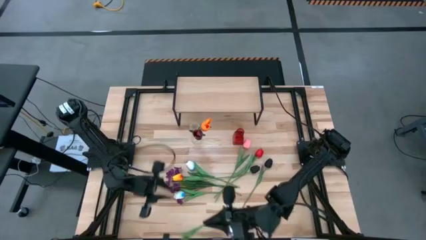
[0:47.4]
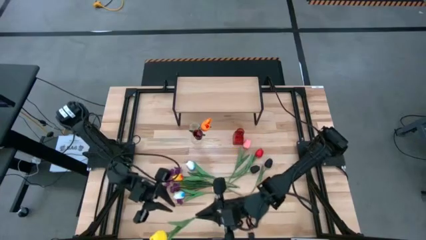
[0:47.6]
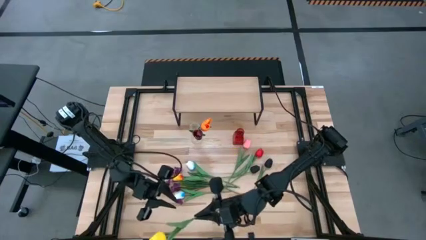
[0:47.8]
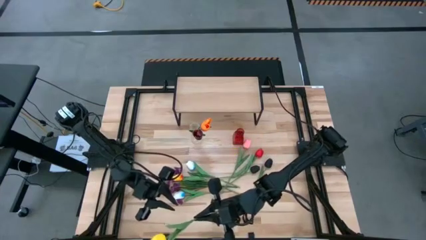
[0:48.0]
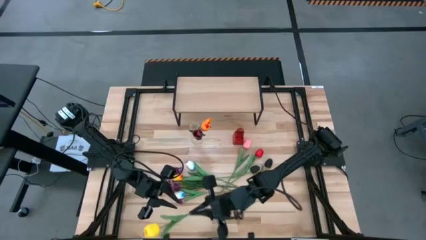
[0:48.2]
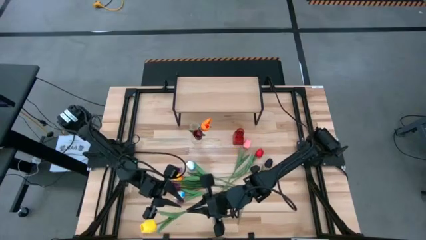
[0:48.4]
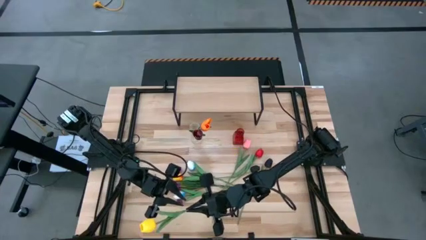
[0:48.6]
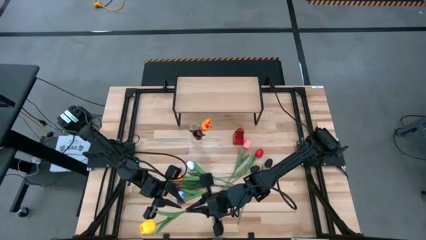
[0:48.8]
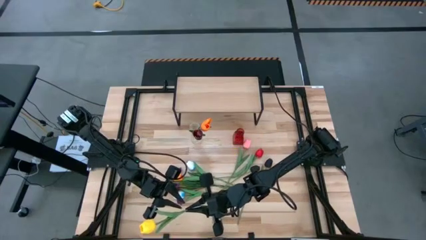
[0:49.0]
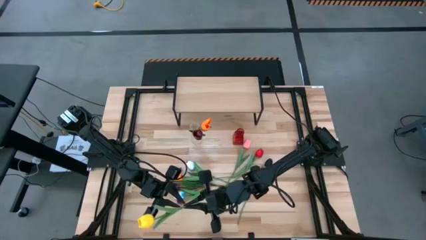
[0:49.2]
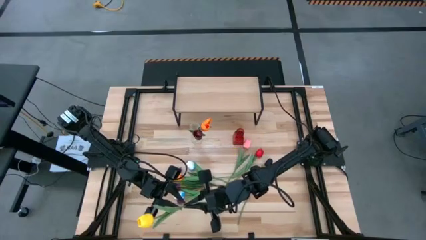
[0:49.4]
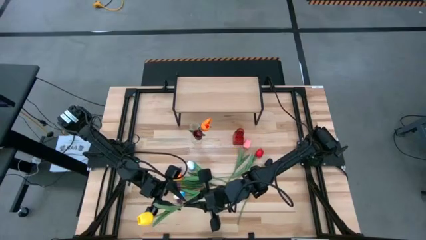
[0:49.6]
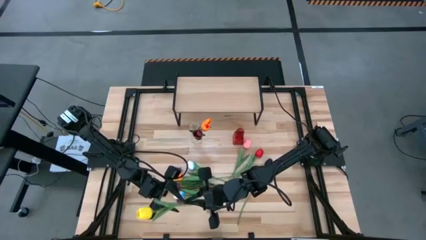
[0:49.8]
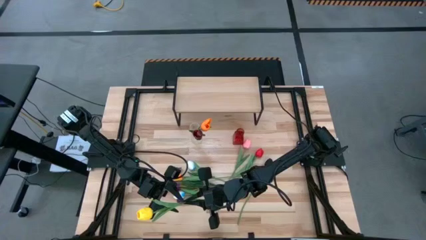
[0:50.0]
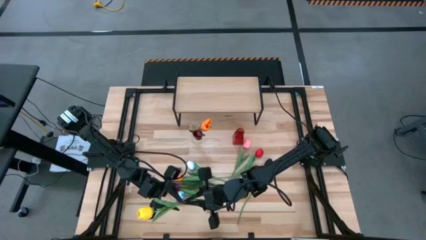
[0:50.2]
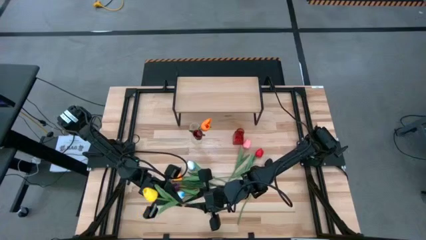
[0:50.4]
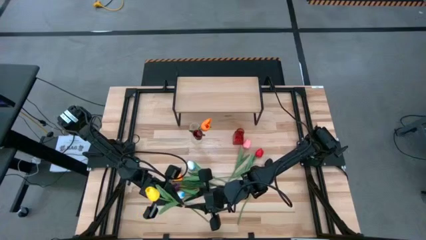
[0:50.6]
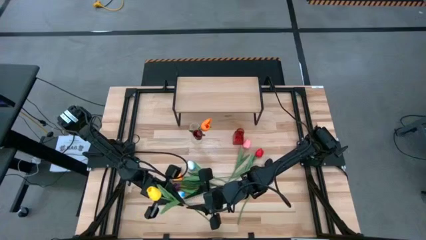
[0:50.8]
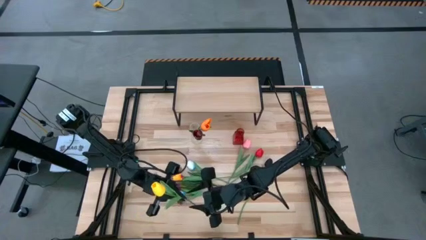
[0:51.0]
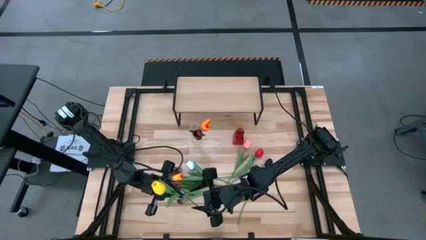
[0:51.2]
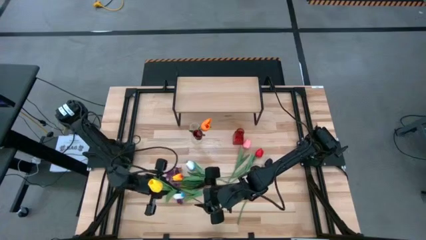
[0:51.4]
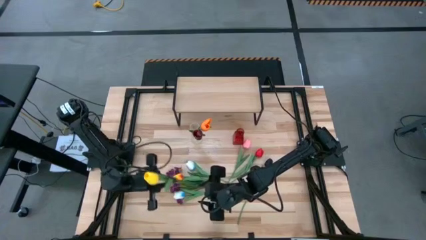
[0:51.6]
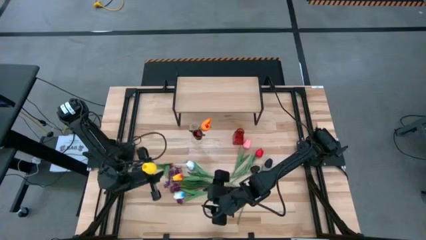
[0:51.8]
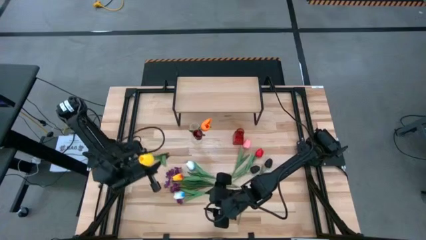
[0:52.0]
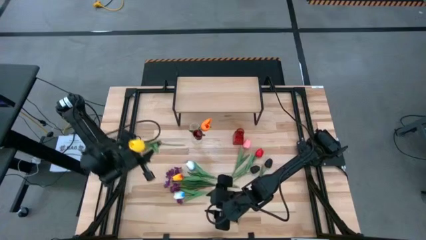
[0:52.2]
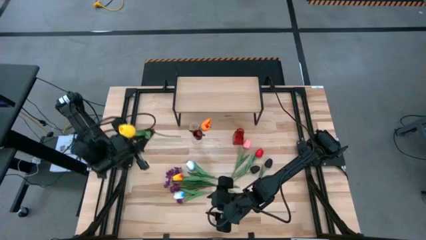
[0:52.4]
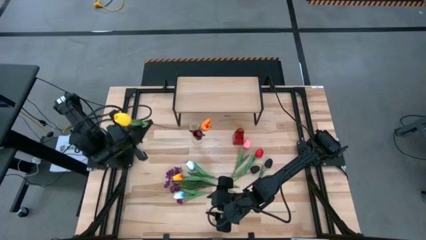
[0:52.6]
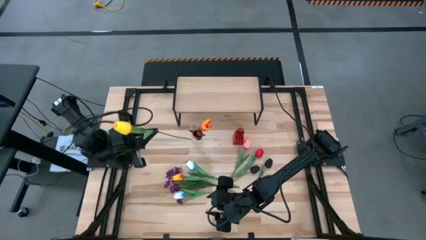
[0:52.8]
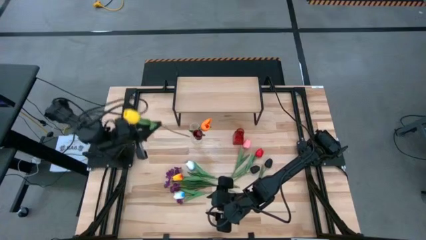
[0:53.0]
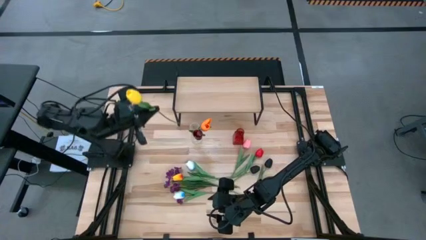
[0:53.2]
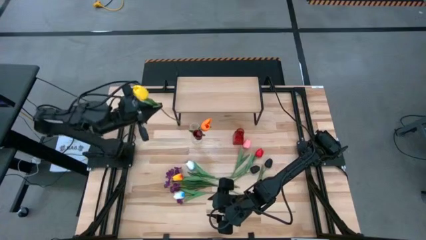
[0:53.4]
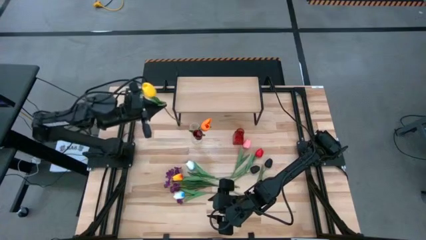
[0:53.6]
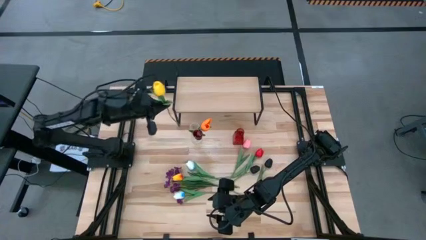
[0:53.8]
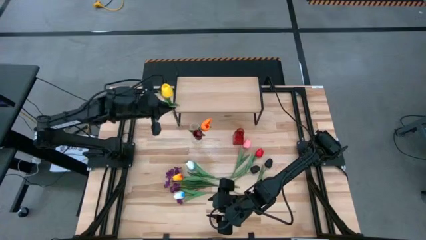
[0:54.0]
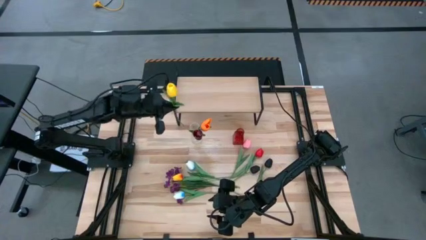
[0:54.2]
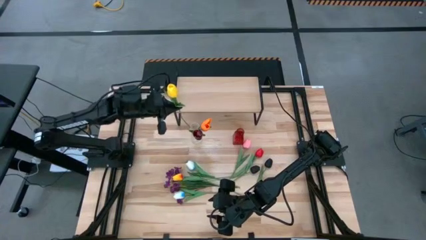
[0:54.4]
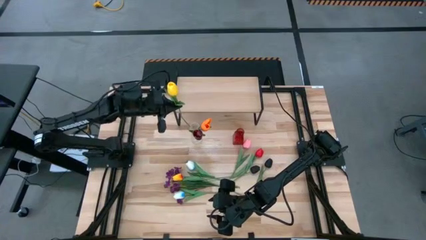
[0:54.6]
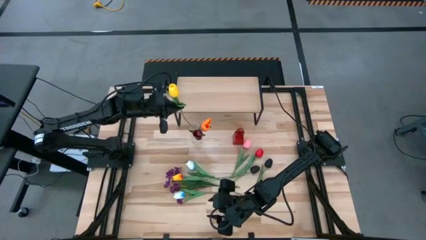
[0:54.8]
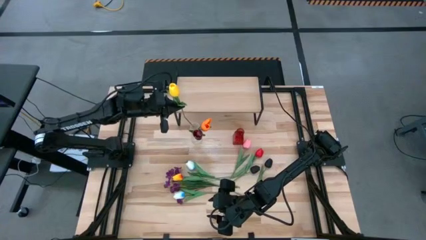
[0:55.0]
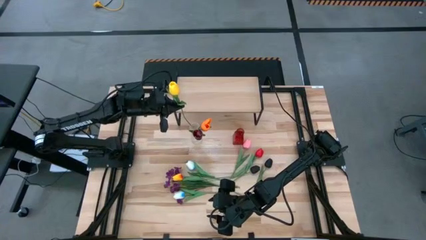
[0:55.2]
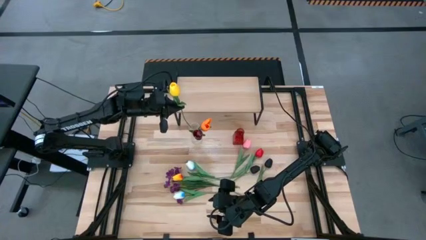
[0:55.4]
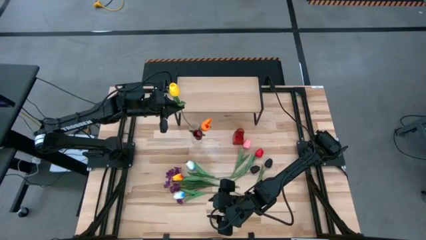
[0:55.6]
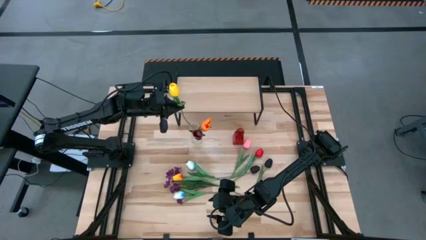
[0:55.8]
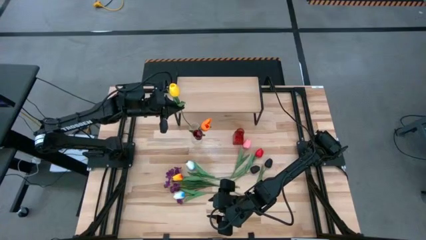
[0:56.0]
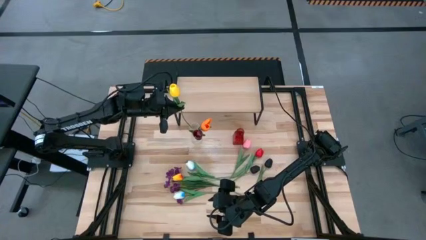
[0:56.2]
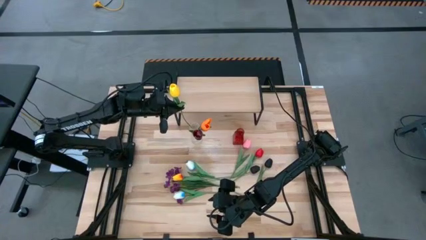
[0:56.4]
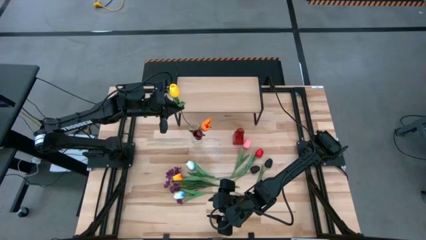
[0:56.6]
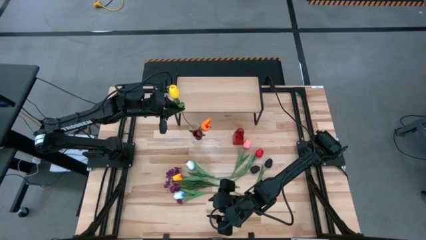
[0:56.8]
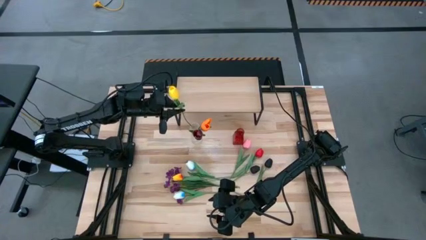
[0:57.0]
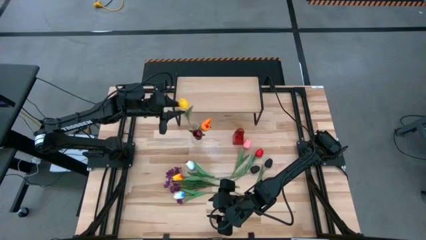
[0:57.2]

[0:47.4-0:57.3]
Task: Pick and place flowers into a vace then onto a shelf
Put the top yellow tulip into the transparent vase

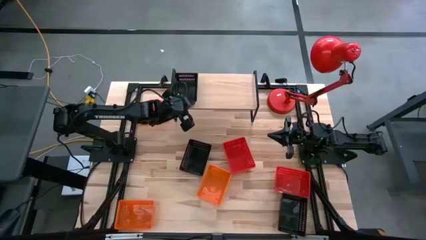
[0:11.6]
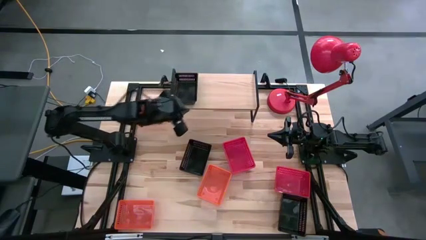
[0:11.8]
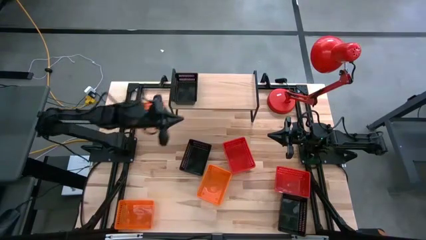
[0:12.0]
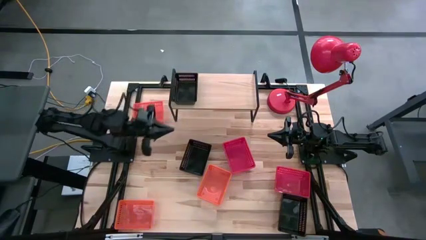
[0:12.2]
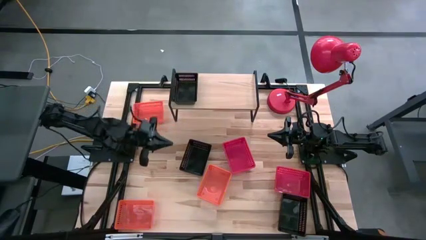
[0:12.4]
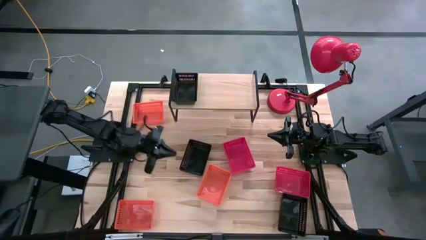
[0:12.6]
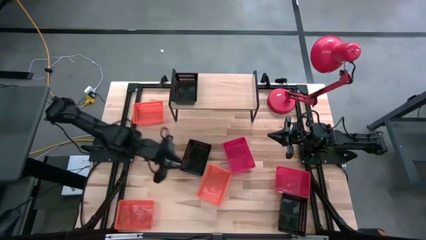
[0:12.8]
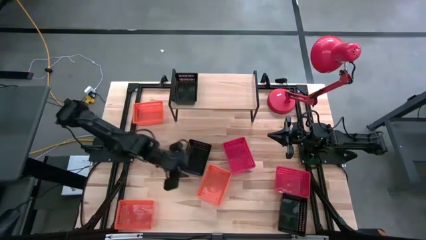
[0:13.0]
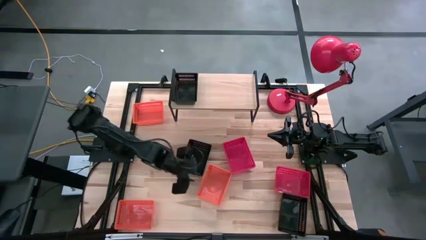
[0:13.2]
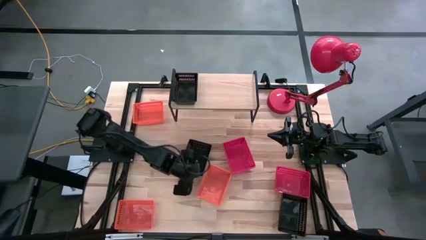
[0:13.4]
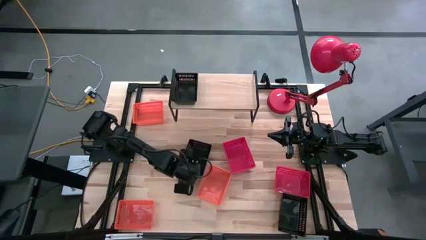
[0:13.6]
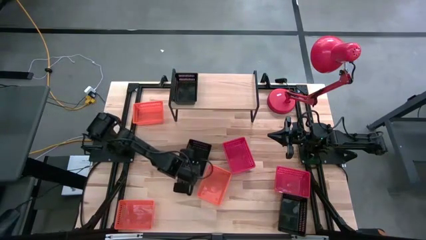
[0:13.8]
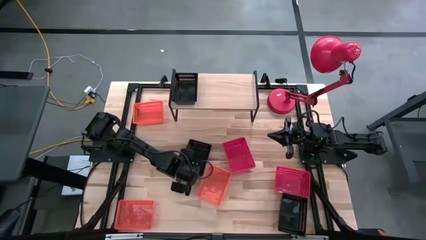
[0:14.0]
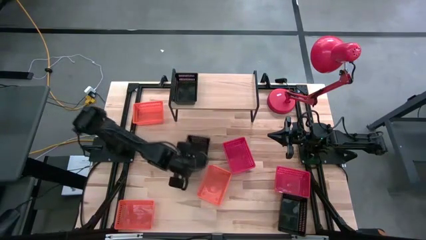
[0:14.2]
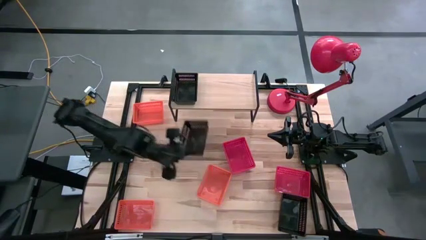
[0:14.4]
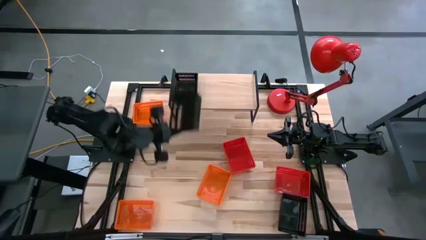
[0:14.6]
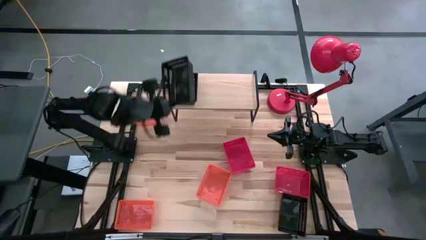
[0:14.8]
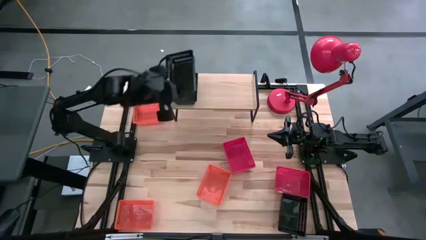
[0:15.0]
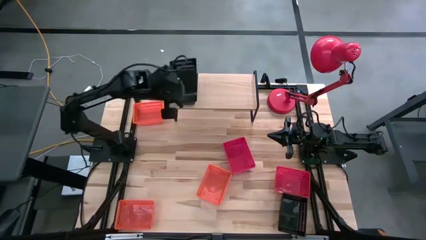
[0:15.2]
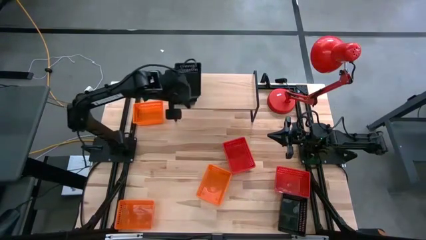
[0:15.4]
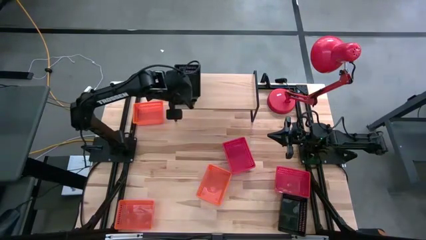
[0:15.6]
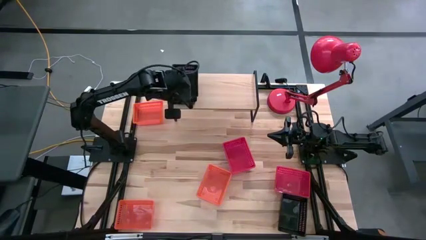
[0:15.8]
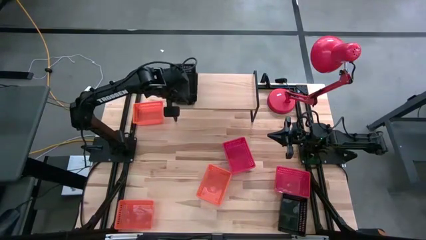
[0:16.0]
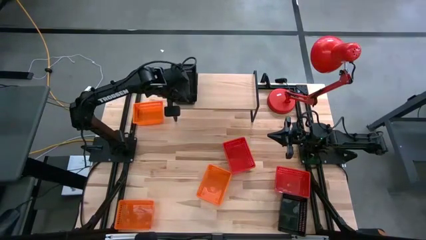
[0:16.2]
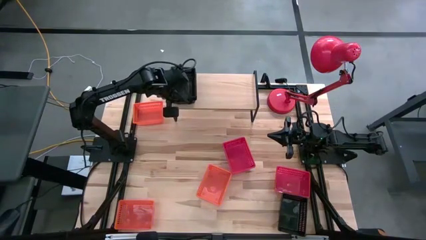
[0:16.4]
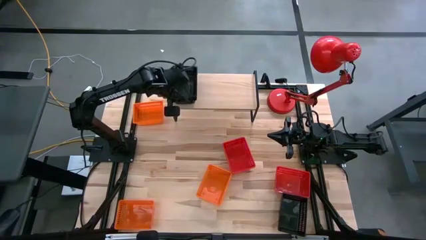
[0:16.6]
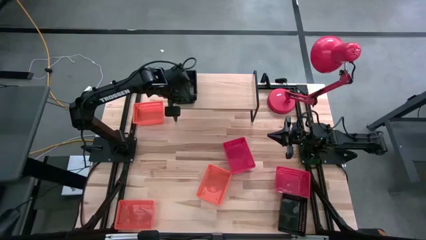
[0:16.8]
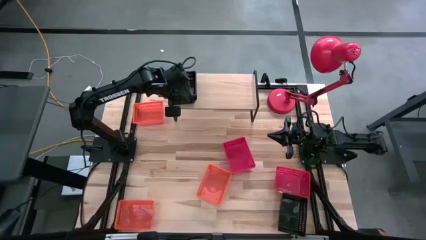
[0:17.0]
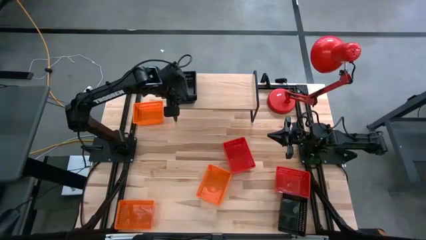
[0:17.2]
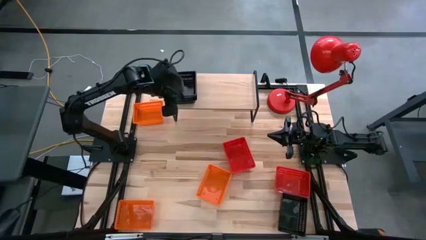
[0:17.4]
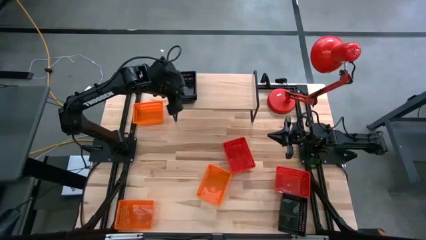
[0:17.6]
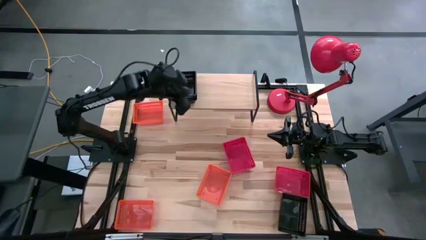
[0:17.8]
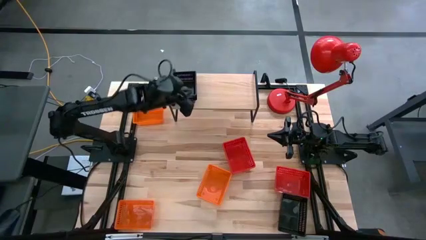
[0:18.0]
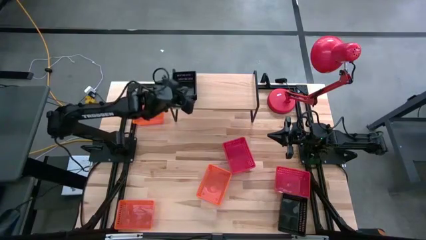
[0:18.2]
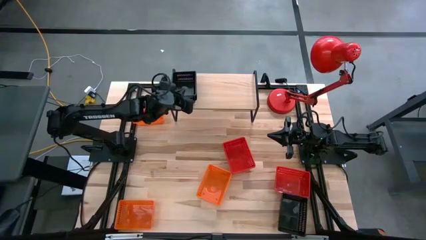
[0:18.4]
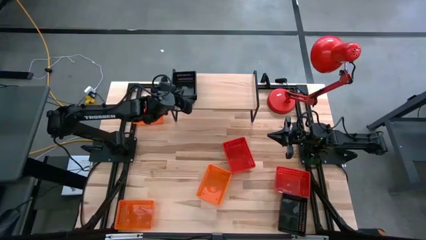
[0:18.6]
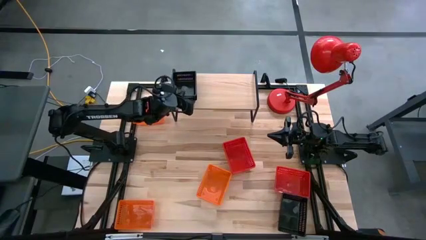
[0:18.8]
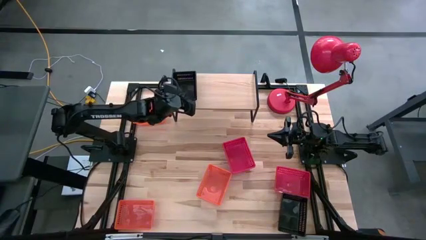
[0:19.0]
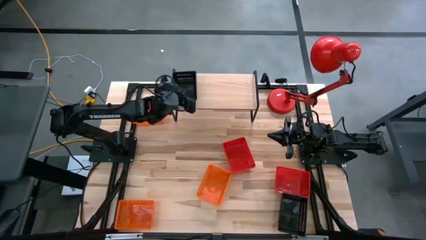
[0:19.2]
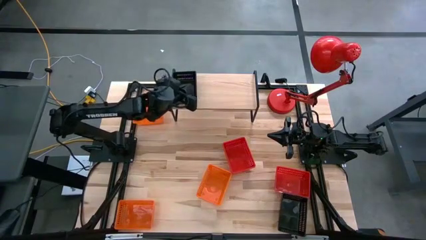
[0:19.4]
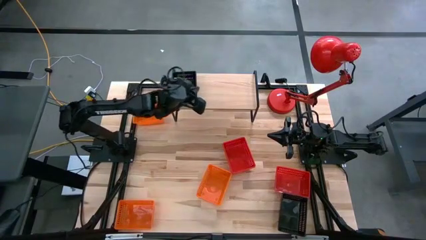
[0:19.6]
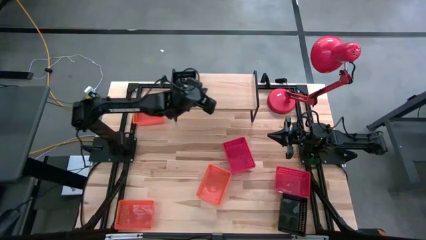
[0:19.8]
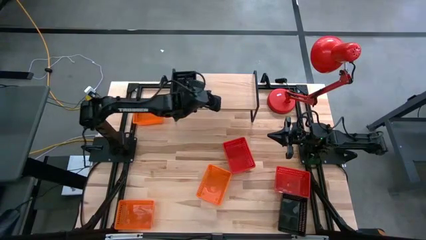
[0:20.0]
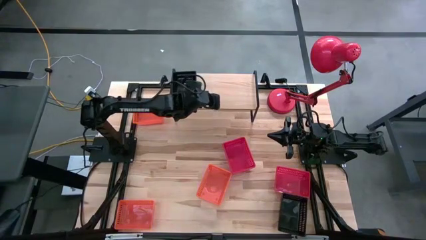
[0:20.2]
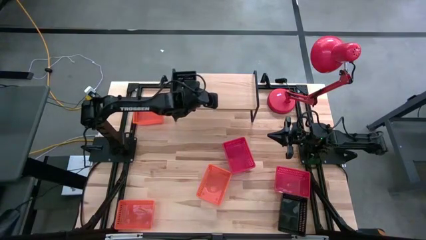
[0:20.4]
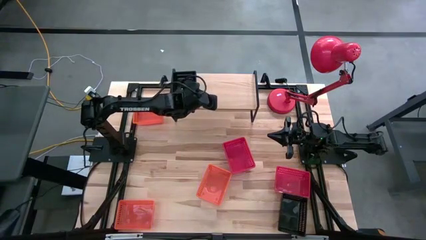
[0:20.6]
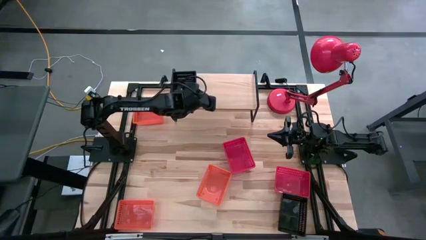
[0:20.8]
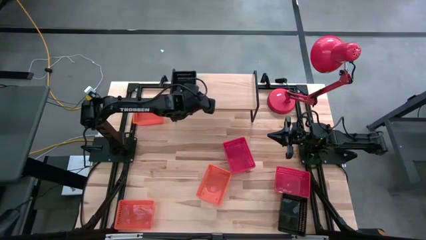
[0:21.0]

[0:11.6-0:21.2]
Task: Stack baskets on shelf by color
Stack the left black basket on top of the black basket on the shelf
